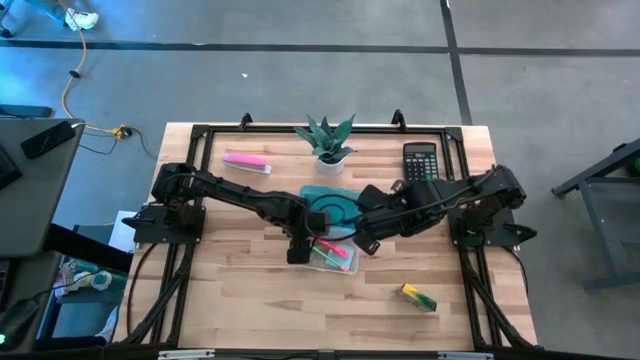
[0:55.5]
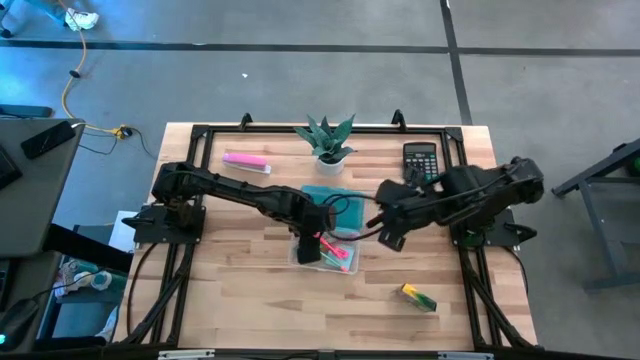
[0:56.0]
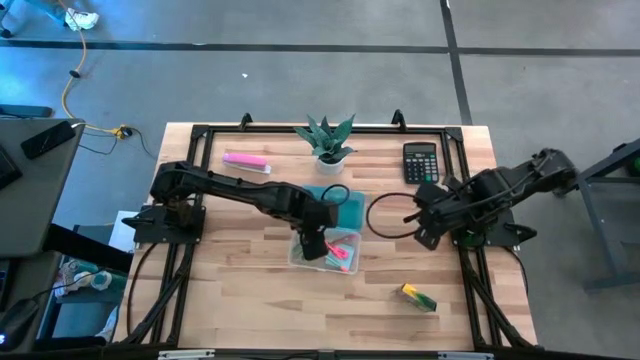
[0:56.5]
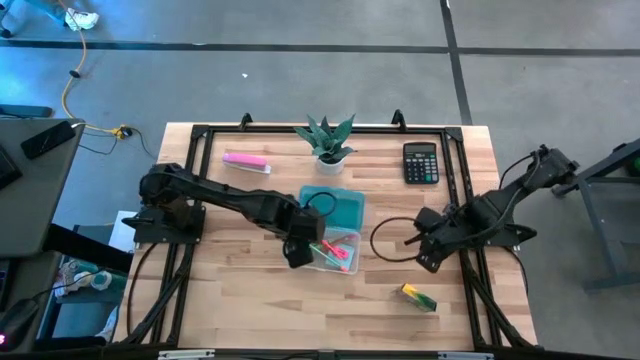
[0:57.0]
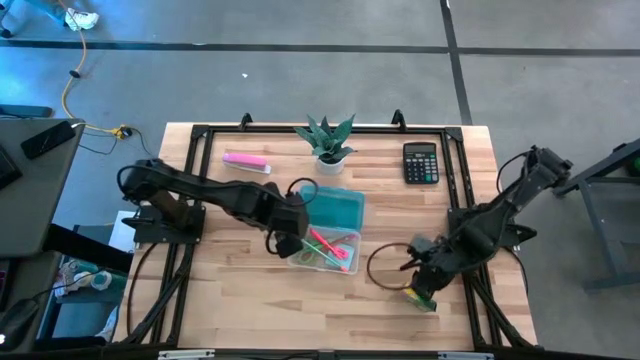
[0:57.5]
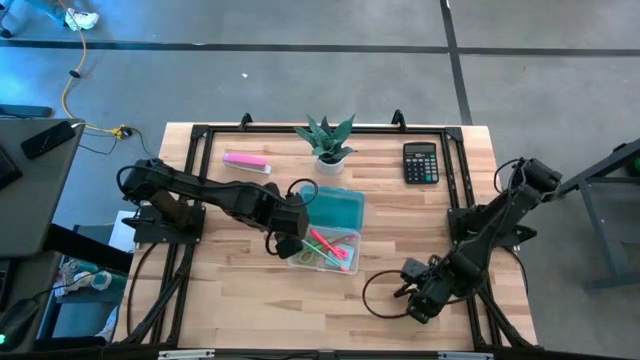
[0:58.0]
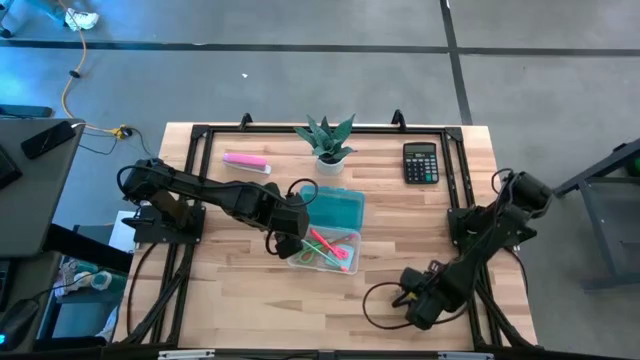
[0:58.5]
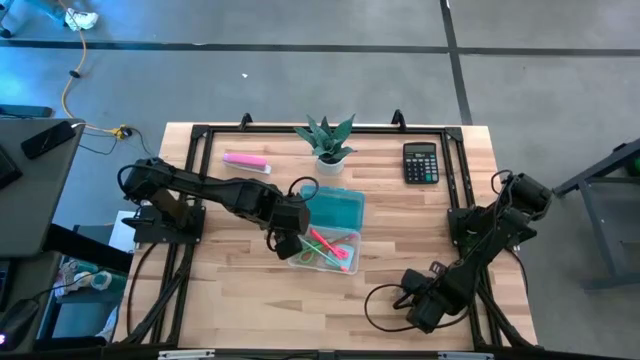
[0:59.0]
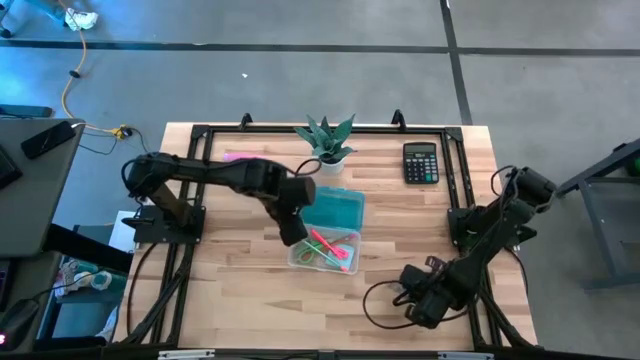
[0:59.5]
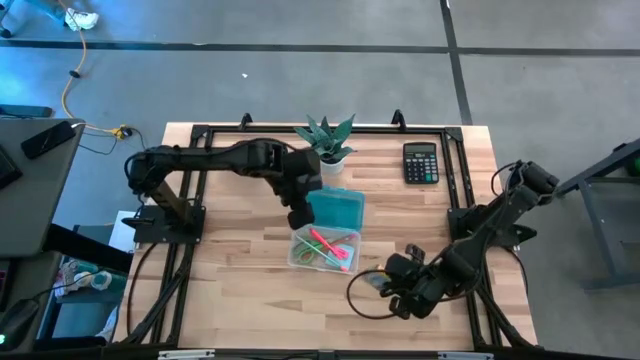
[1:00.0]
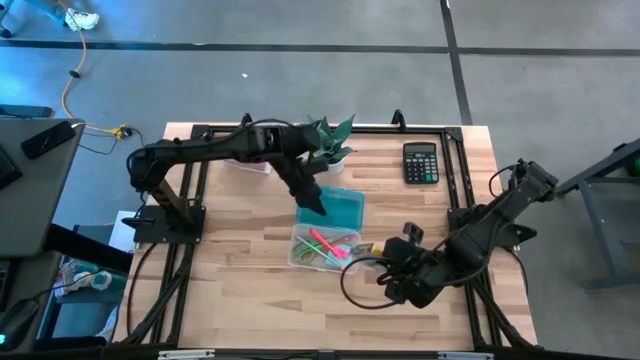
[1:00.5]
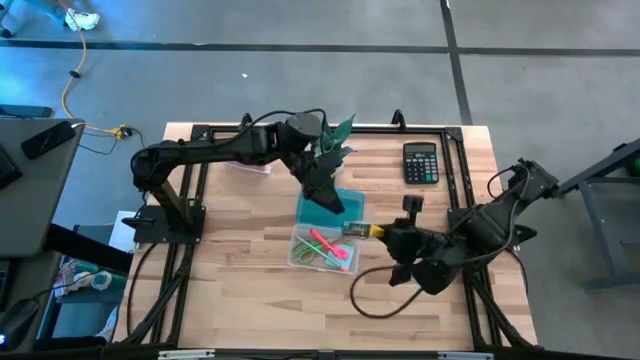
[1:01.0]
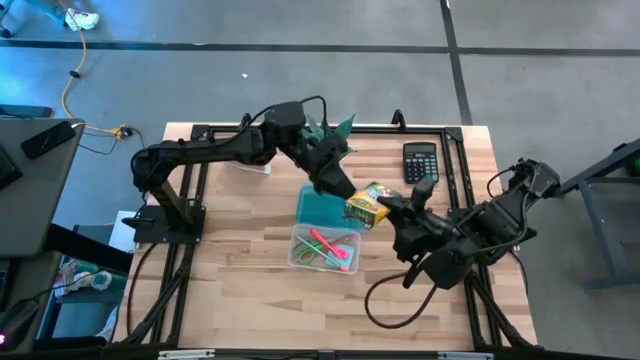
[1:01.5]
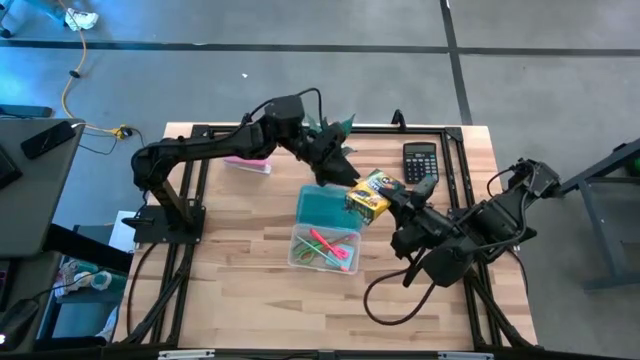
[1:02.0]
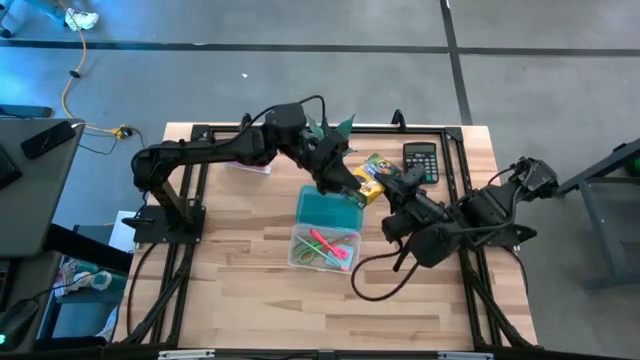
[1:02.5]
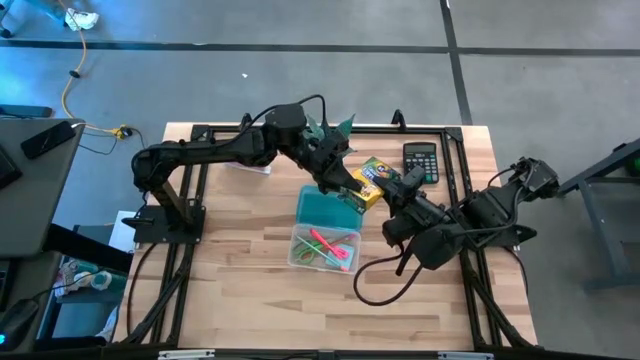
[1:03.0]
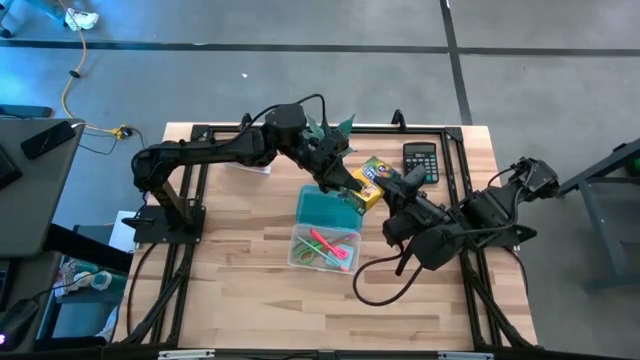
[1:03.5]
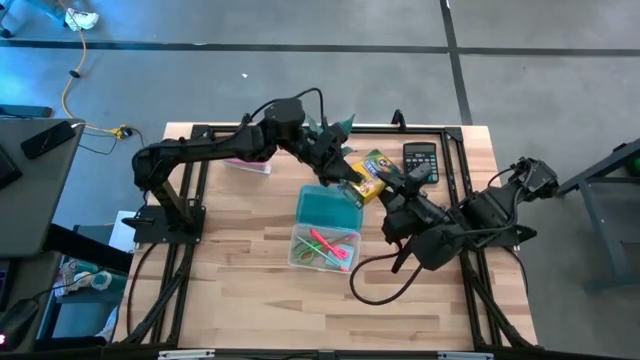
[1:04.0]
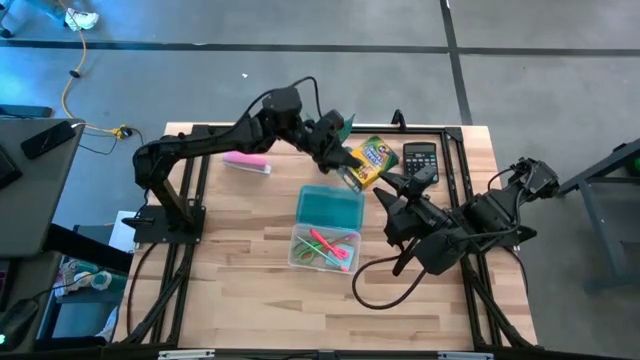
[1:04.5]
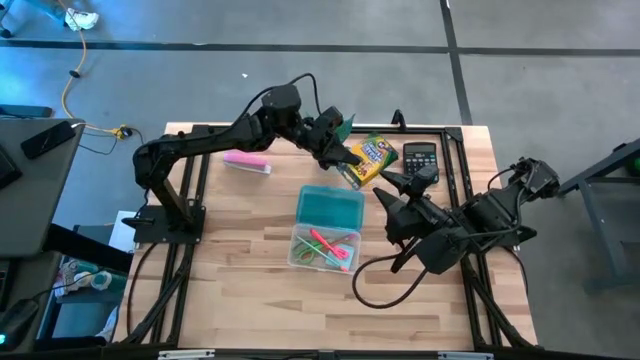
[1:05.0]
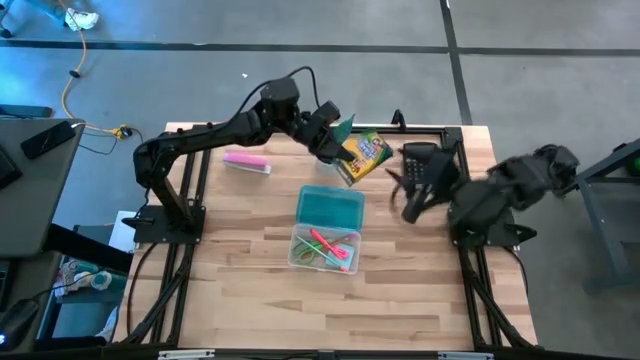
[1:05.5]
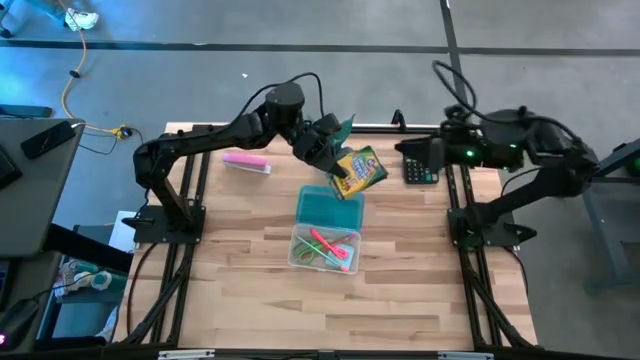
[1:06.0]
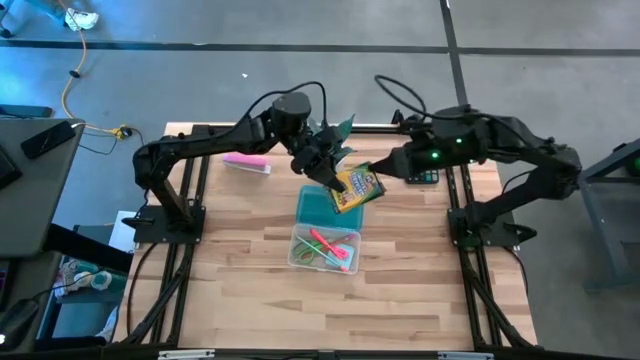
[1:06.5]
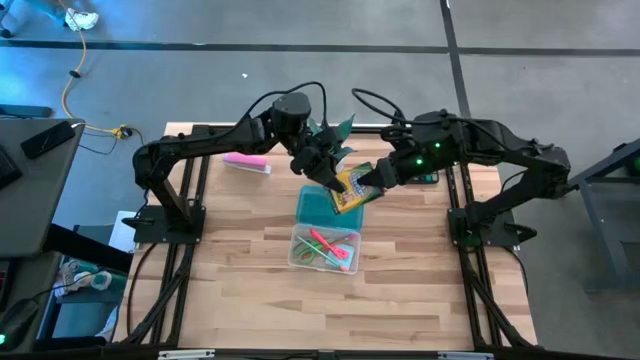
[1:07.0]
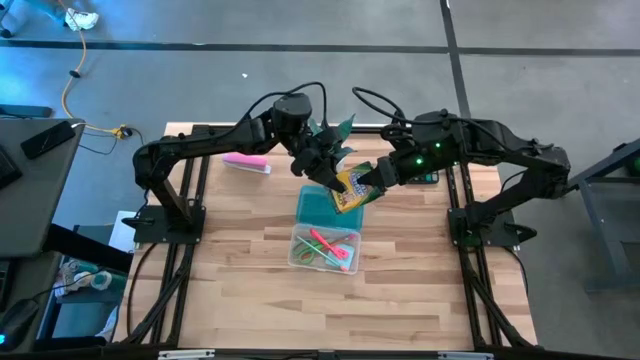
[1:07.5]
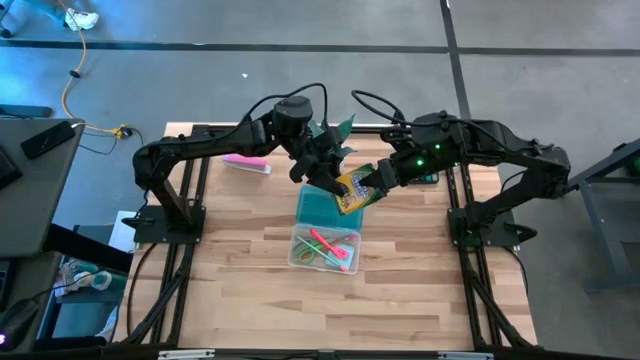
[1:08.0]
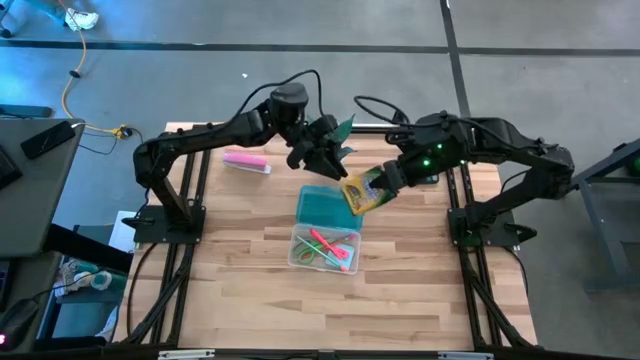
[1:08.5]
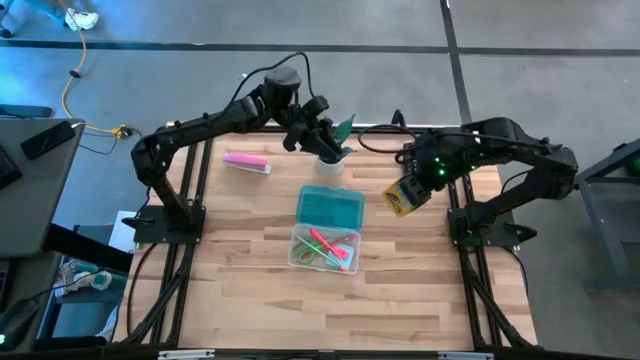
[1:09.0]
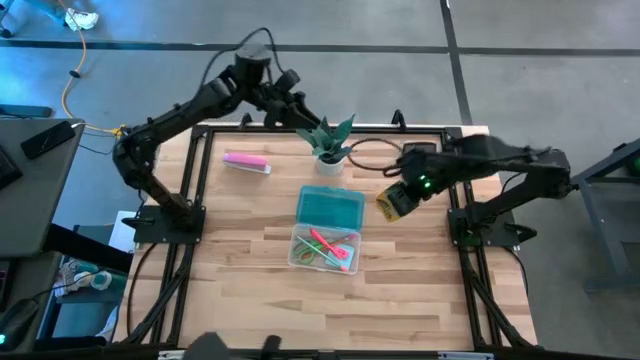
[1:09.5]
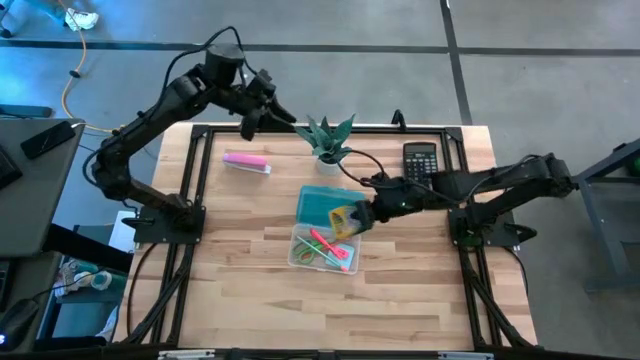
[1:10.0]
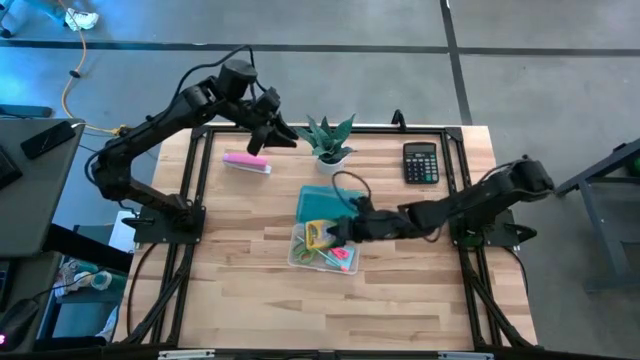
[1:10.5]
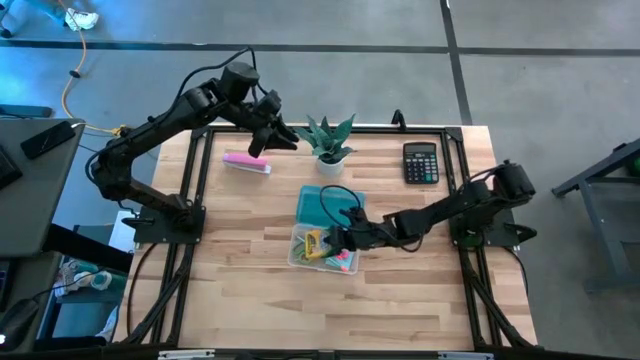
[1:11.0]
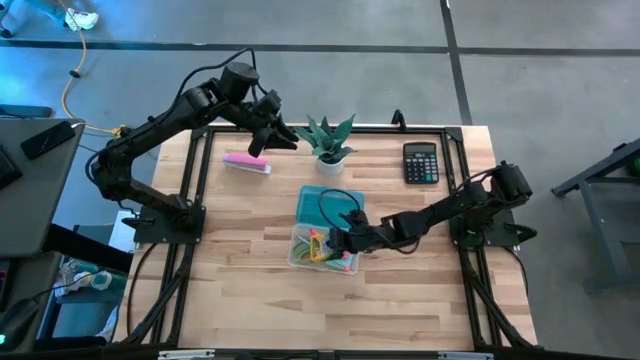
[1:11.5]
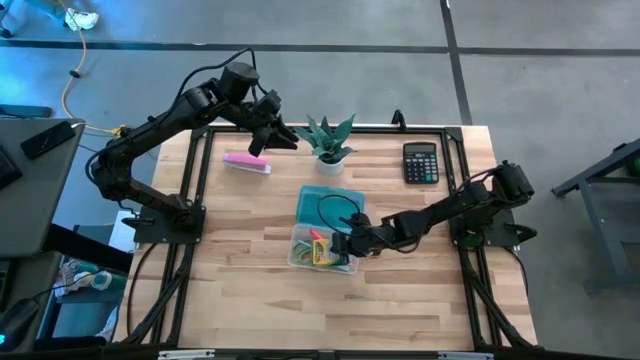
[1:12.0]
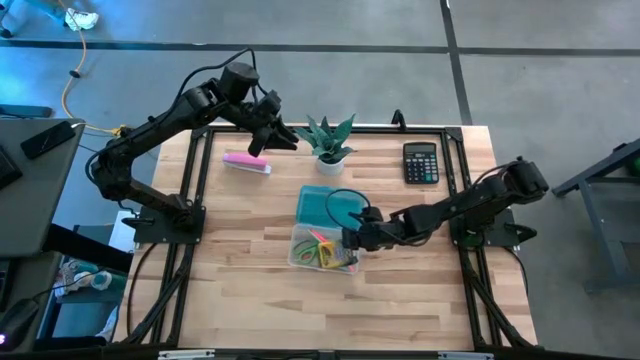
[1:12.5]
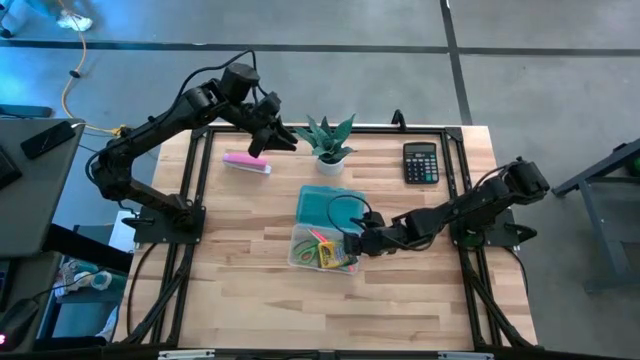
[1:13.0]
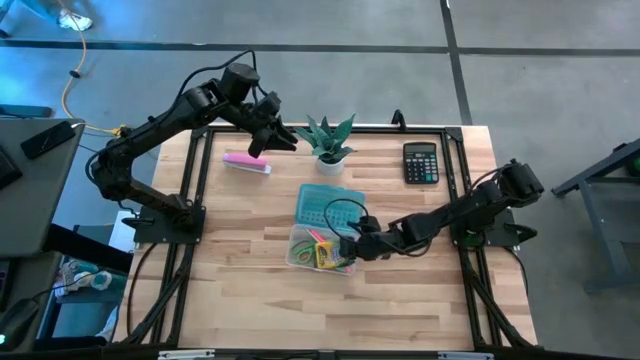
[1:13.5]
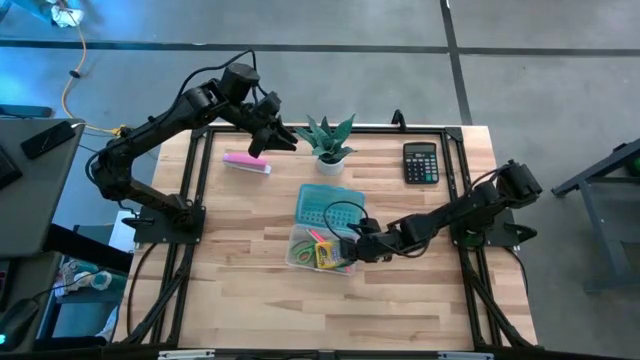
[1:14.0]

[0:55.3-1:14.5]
Task: Pack school essentials
Put the yellow crayon pack into the blue supply box

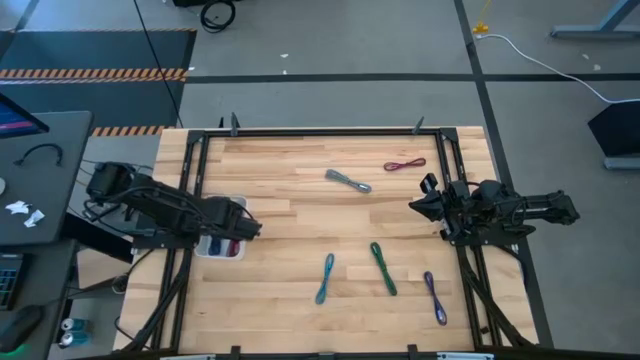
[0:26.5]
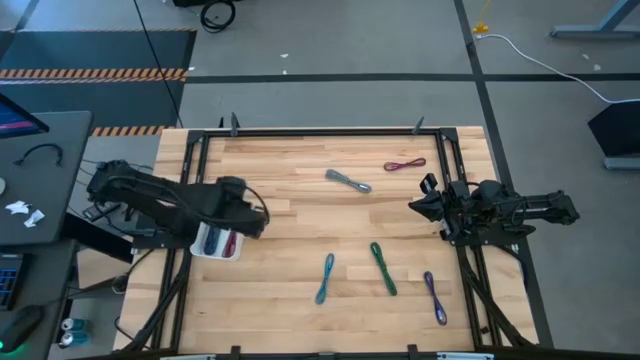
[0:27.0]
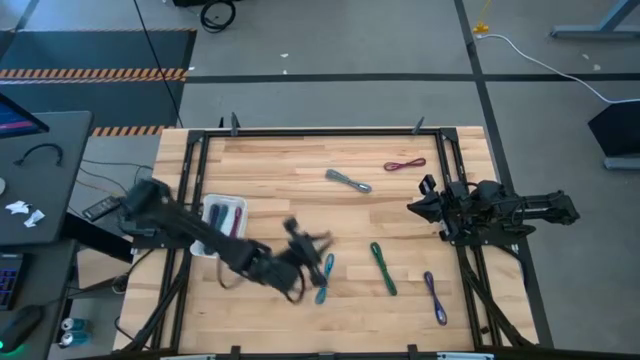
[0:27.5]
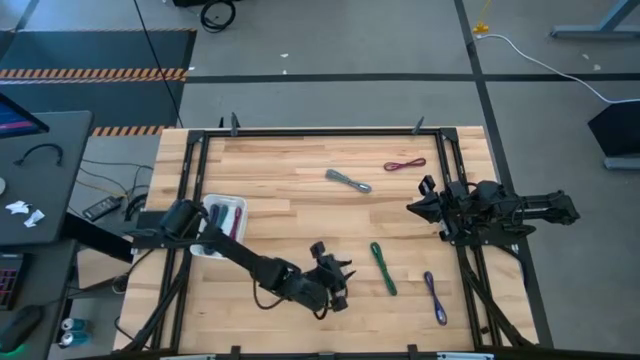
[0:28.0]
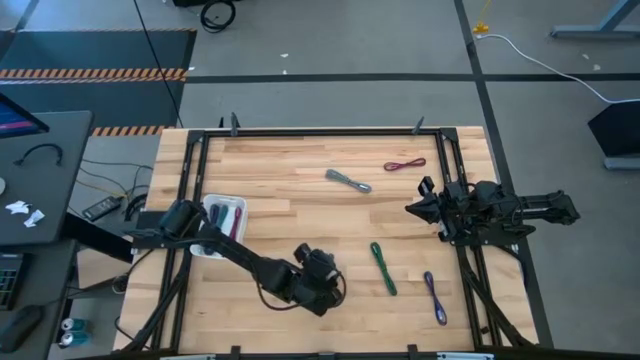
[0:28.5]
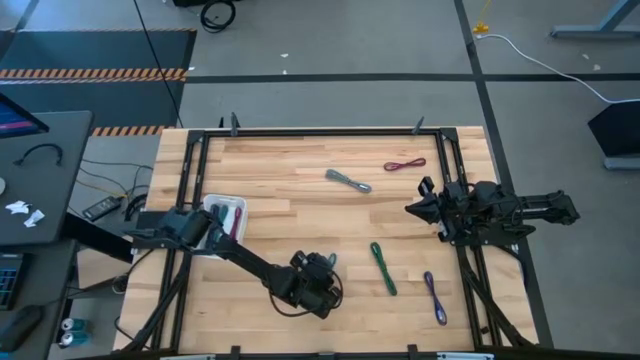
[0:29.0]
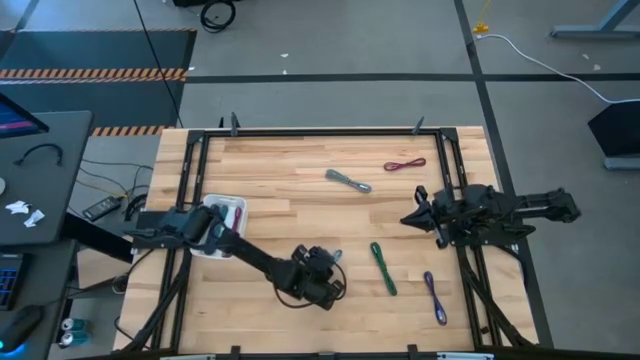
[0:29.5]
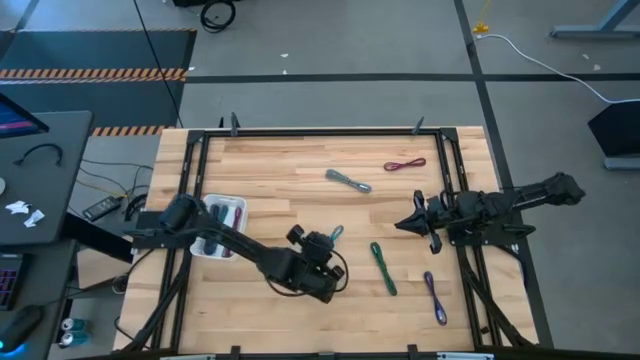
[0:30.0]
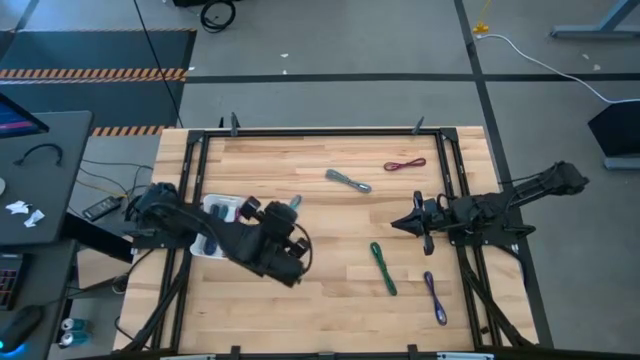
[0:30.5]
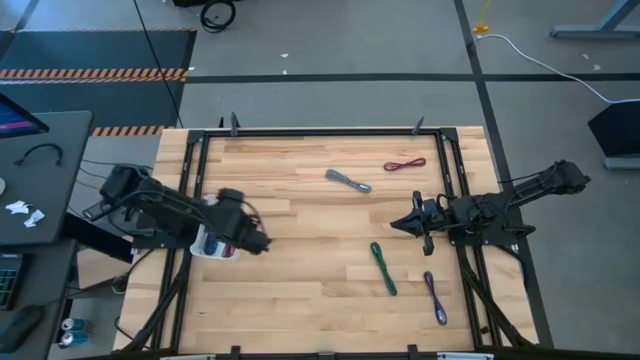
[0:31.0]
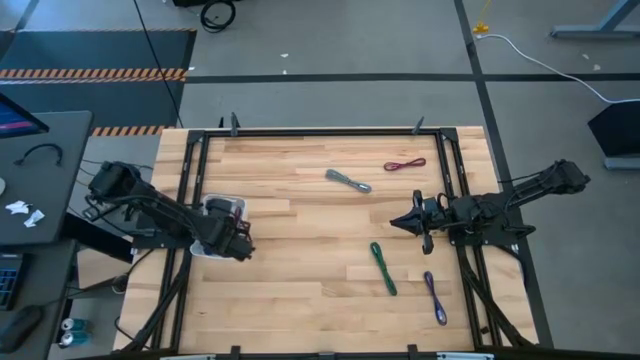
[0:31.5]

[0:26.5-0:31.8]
Task: Pick and place USB-C Cables
Put the blue charger cable into the white bin
